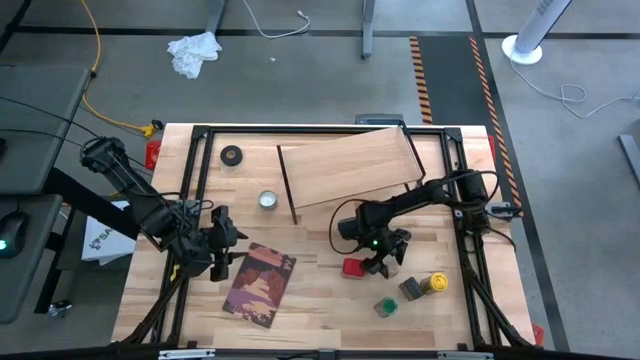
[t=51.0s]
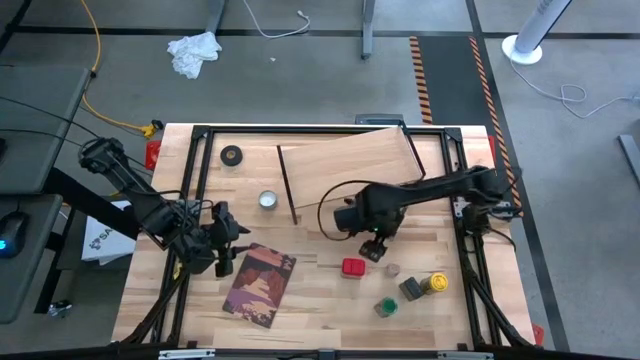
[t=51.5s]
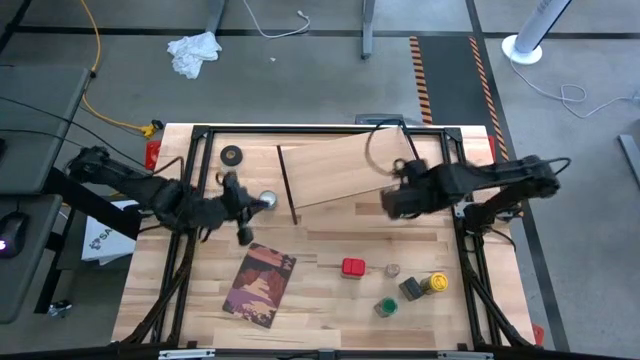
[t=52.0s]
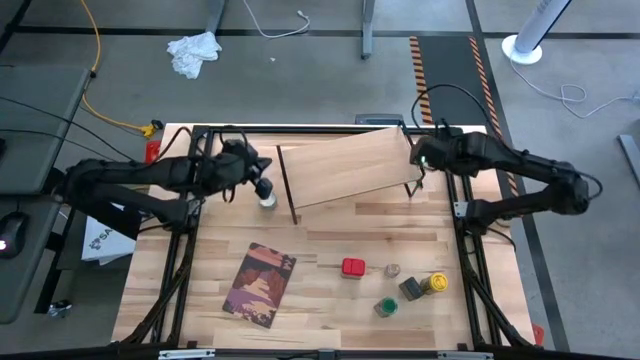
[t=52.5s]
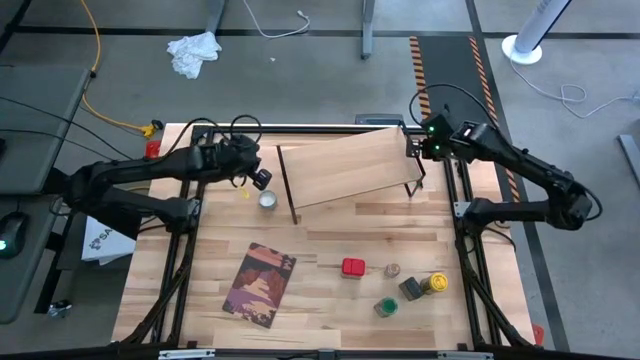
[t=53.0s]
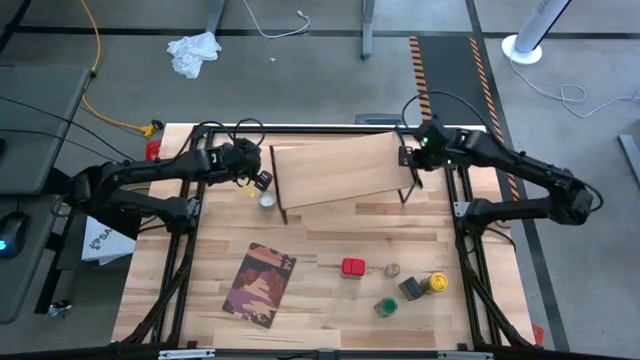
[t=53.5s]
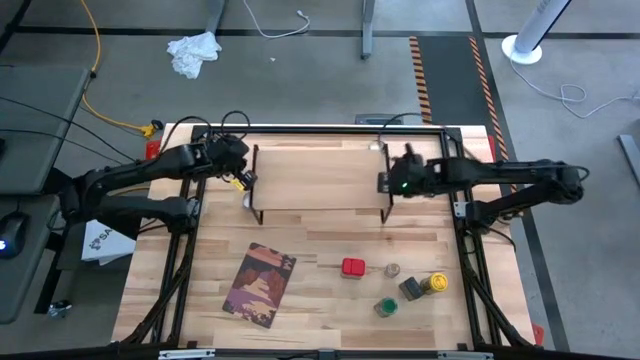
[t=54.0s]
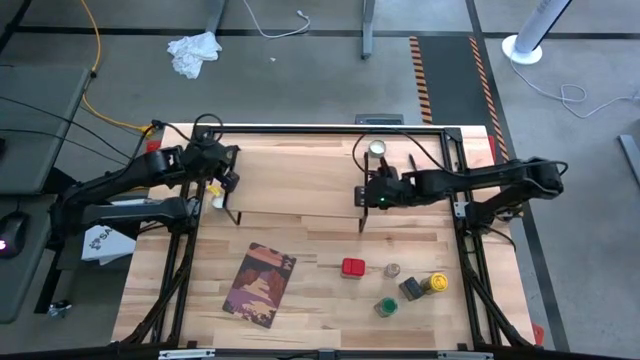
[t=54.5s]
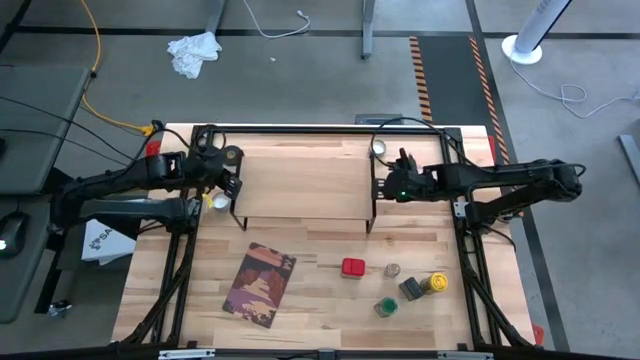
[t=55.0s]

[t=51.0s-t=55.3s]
Task: Shelf spices
Adjust the shelf

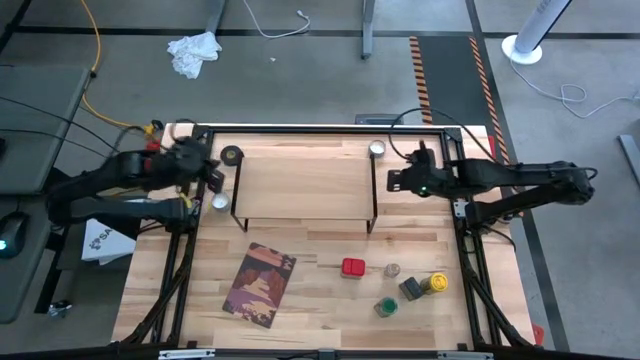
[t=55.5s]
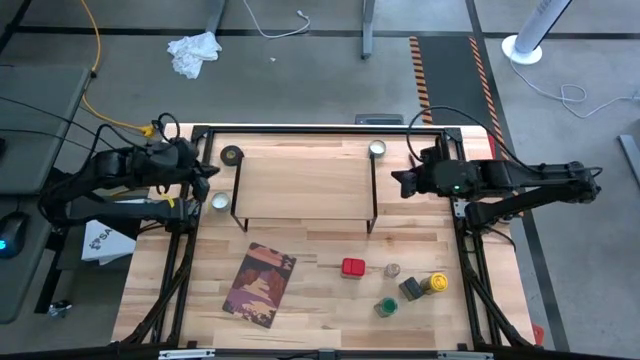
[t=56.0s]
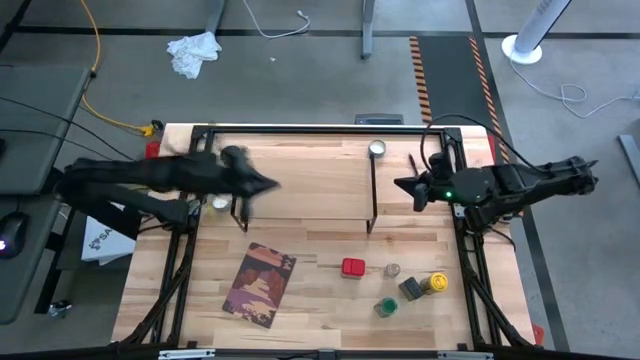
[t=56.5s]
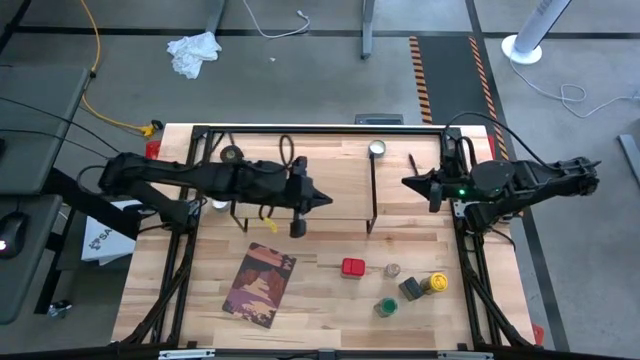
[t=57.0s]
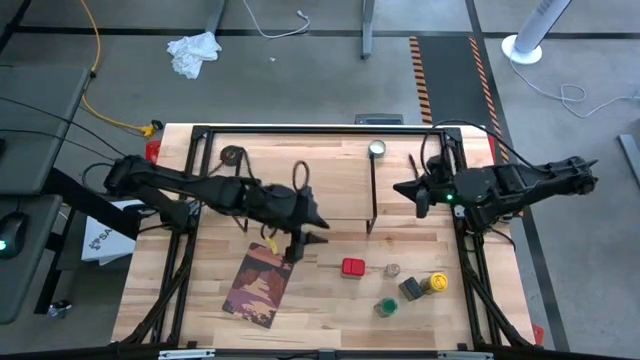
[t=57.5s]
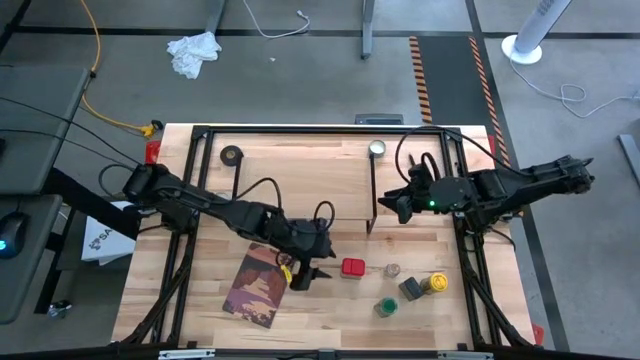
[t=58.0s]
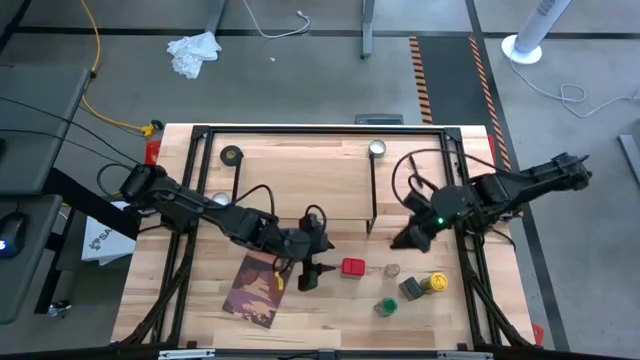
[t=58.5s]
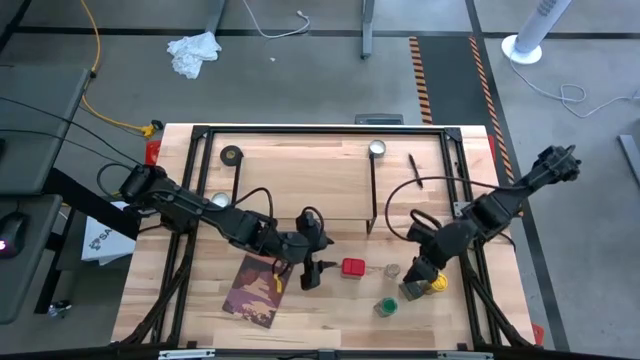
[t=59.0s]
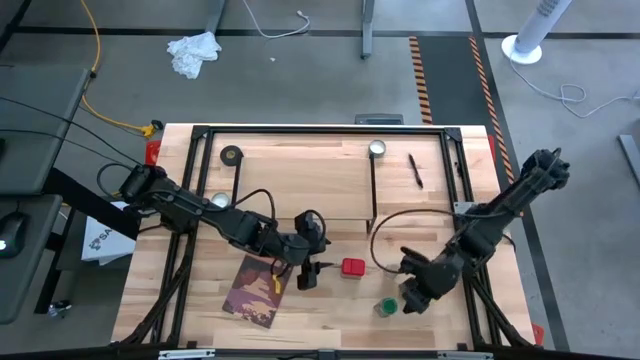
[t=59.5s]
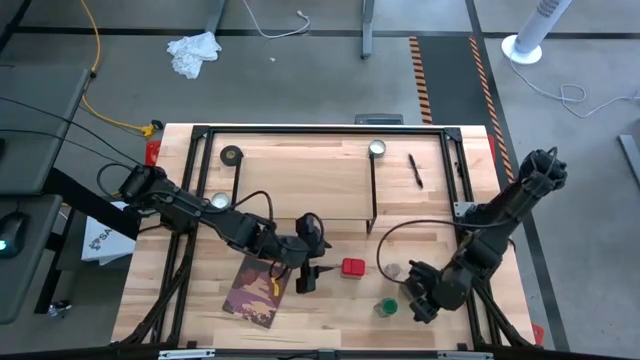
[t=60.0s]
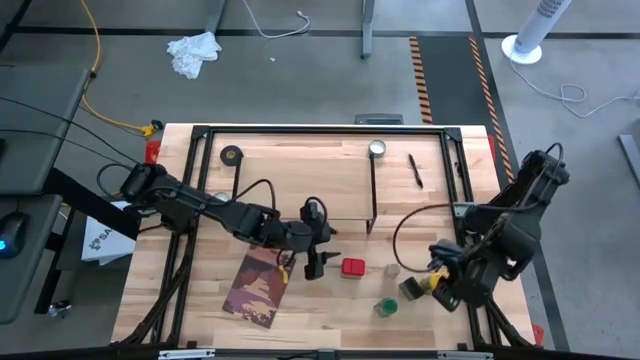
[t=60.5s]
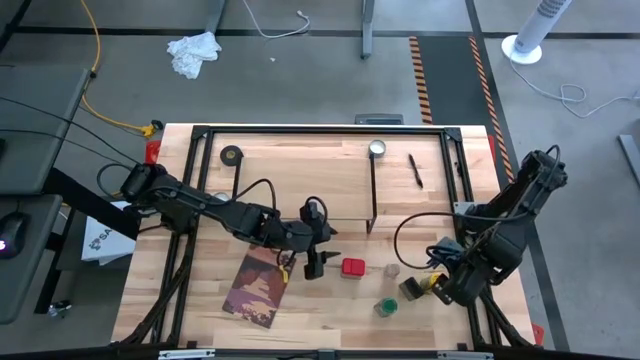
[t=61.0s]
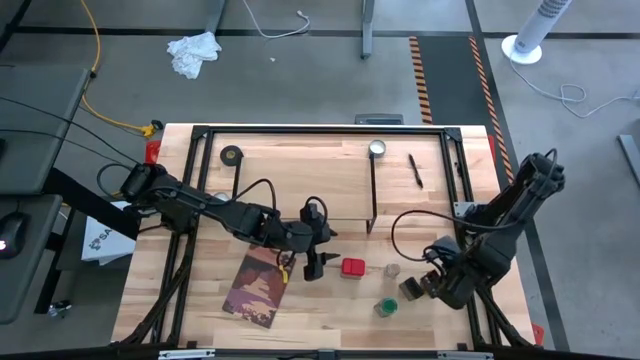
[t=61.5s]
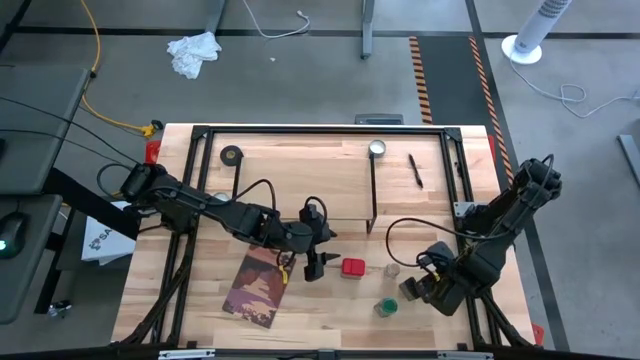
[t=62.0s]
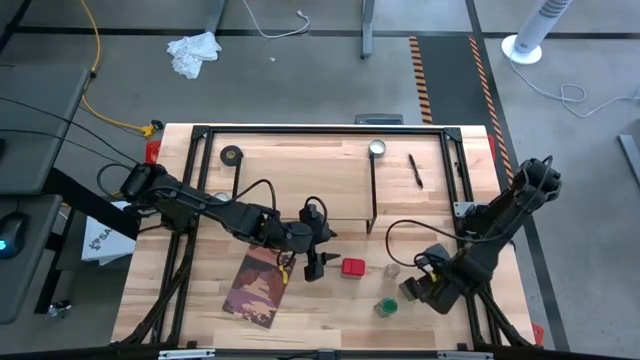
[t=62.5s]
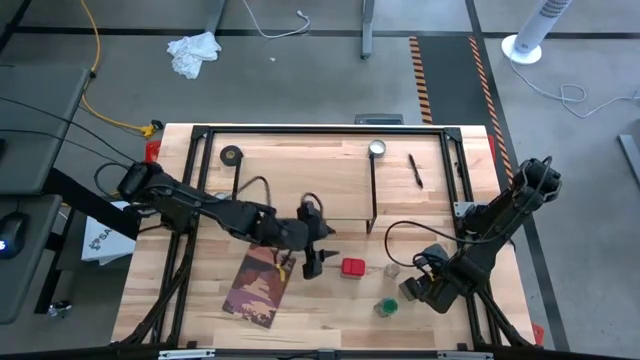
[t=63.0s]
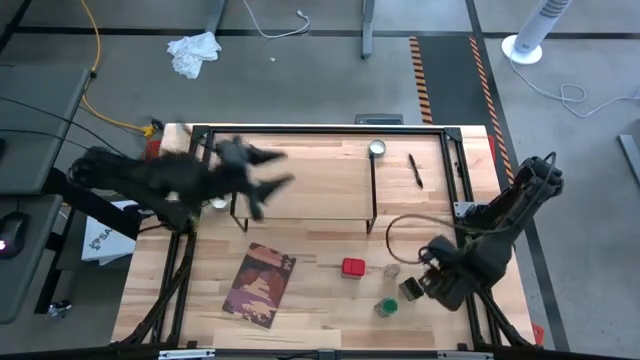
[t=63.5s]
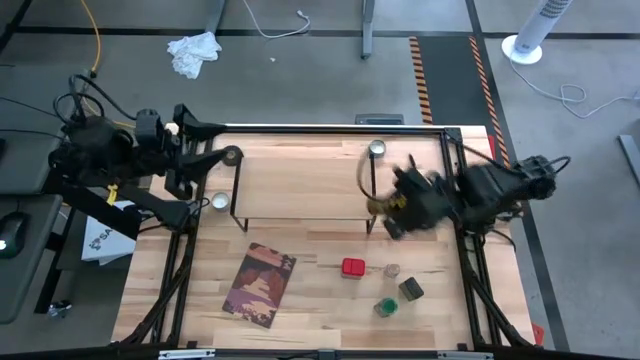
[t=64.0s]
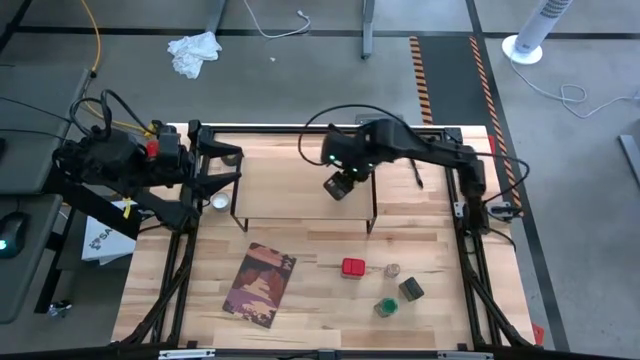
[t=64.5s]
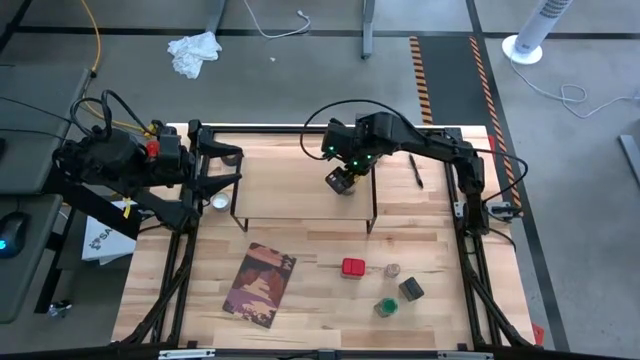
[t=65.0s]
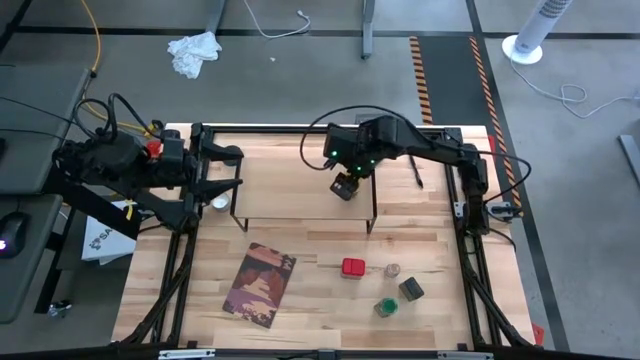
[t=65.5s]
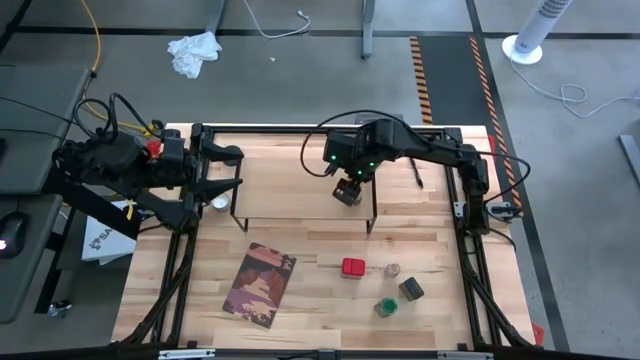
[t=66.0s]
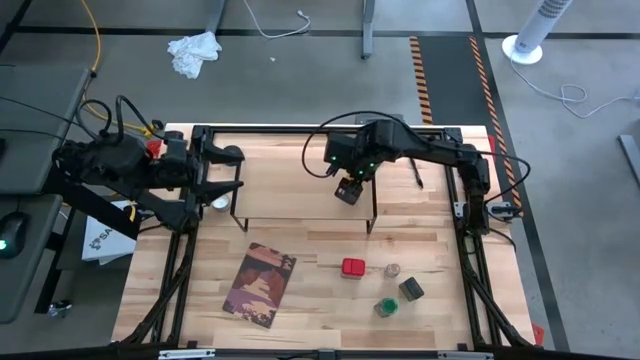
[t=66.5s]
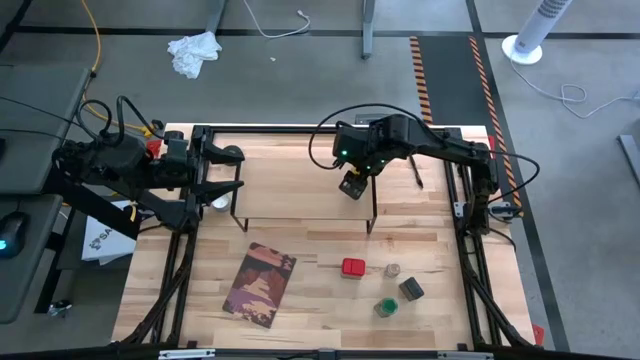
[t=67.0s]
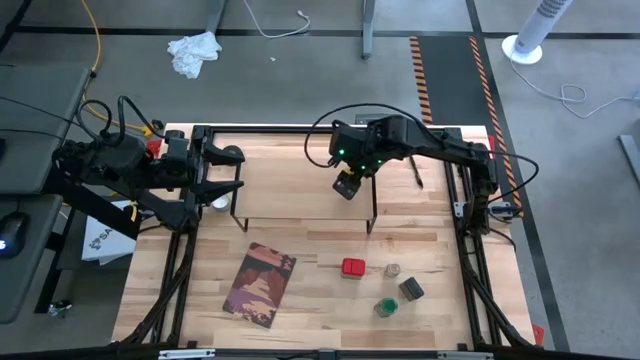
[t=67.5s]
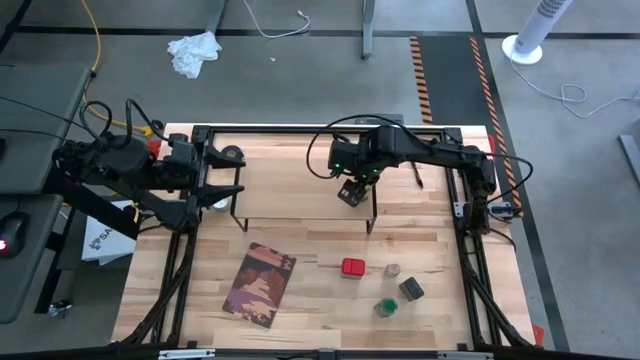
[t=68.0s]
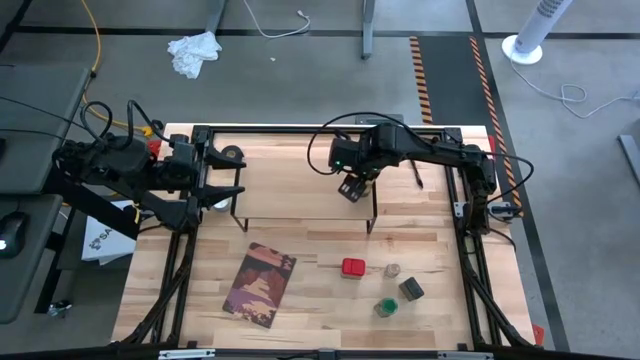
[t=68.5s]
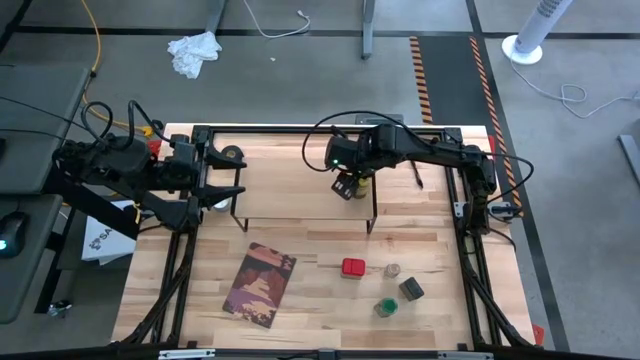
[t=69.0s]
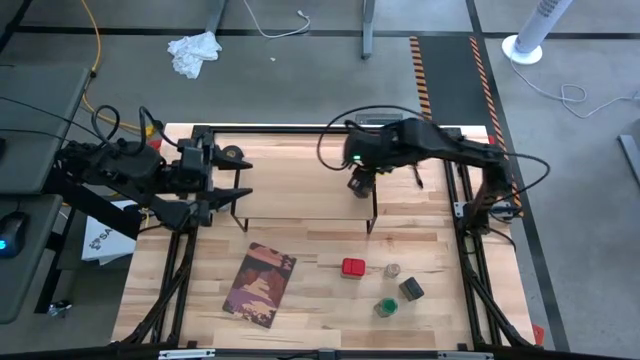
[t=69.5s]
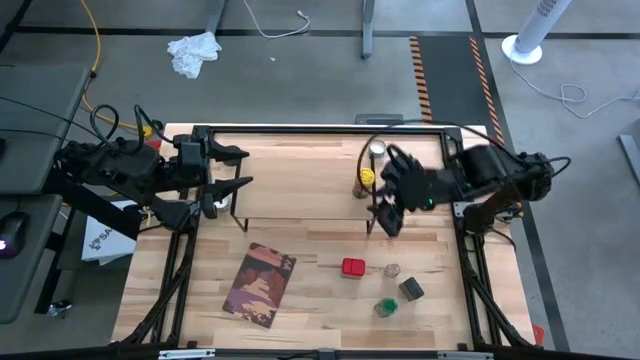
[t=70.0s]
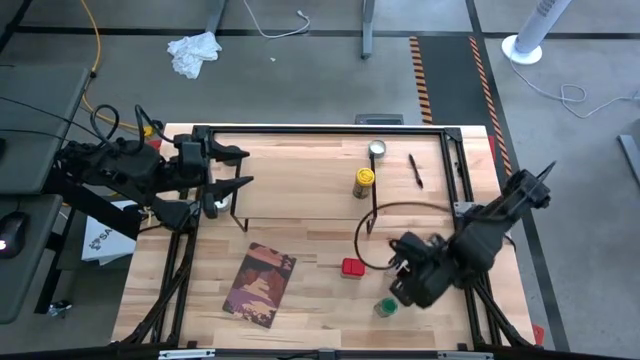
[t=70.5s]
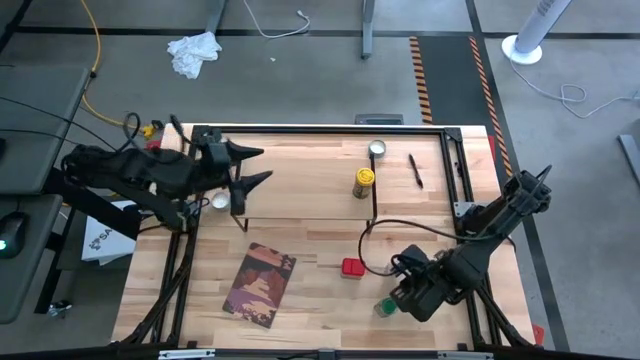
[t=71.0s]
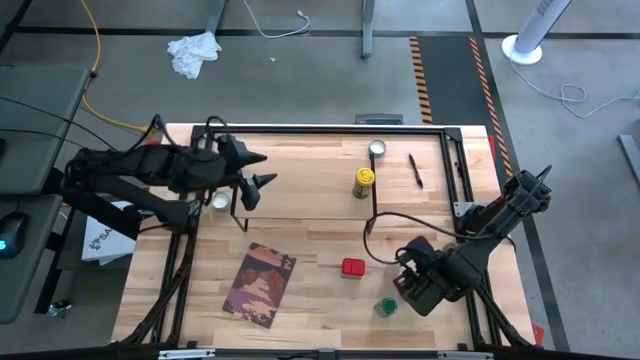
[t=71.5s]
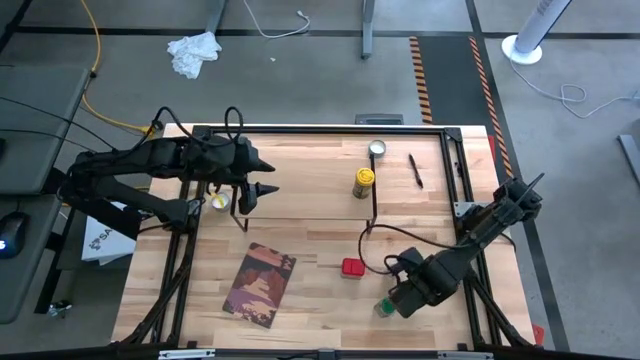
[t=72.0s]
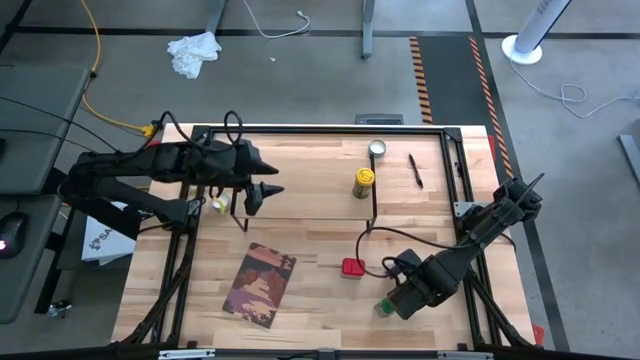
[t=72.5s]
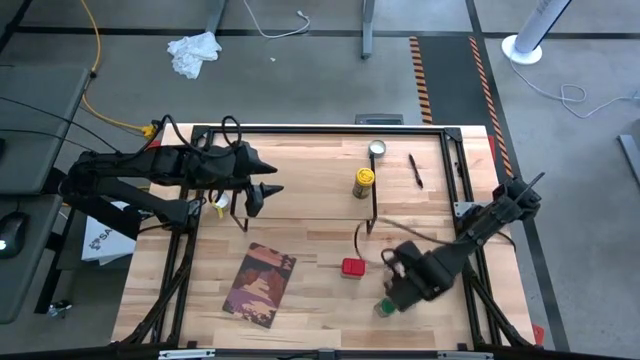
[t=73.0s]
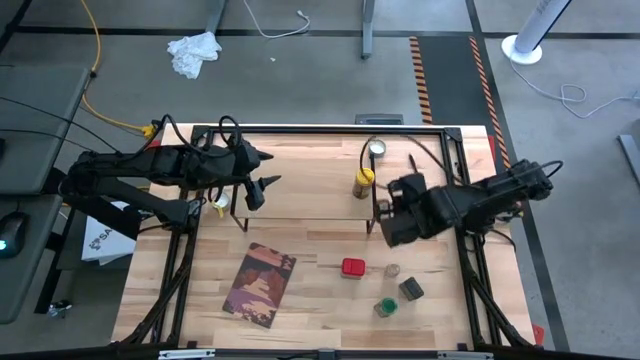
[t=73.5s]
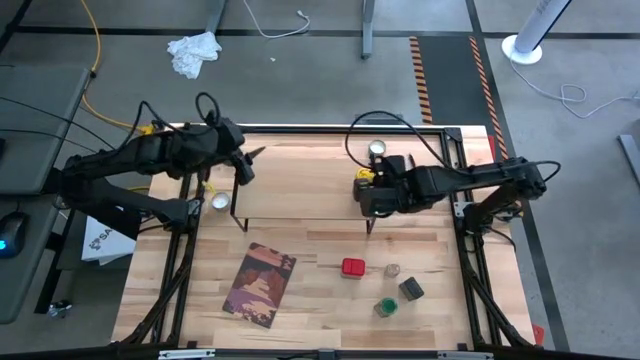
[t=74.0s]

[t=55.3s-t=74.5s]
Put the yellow seasoning bottle on the shelf
